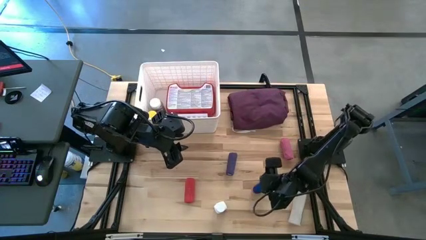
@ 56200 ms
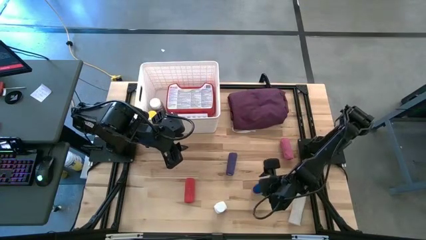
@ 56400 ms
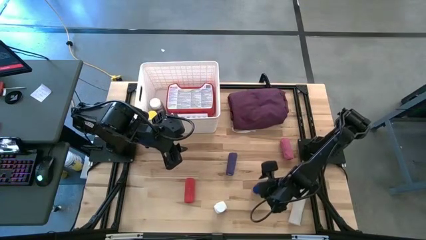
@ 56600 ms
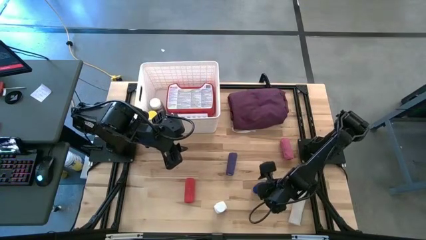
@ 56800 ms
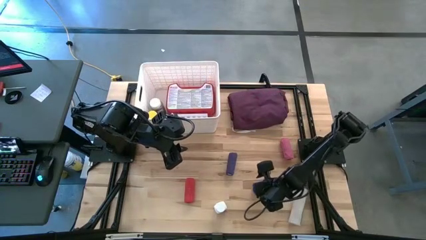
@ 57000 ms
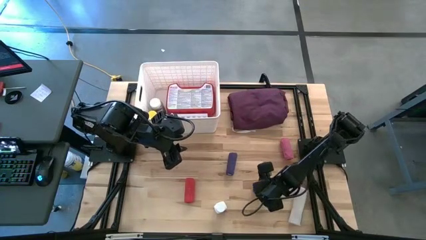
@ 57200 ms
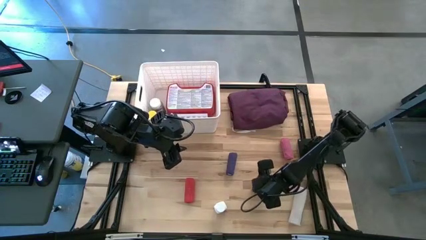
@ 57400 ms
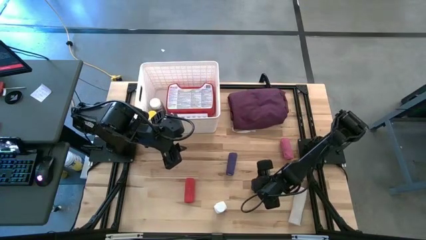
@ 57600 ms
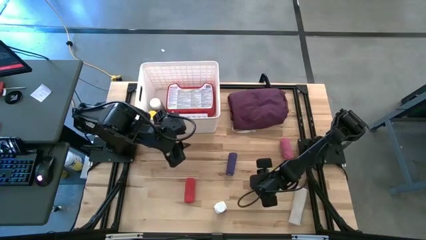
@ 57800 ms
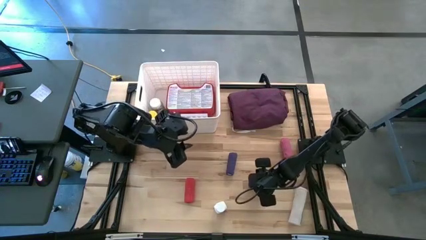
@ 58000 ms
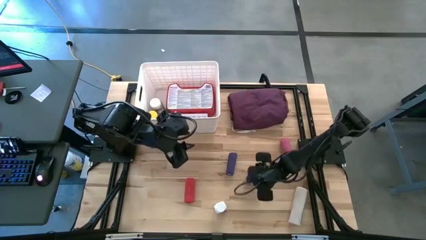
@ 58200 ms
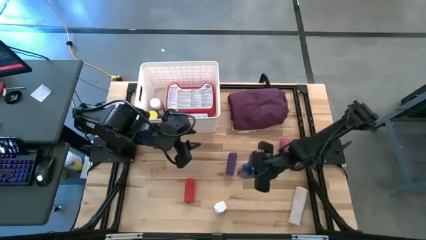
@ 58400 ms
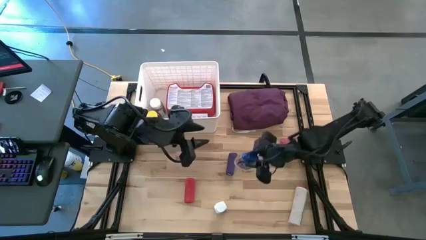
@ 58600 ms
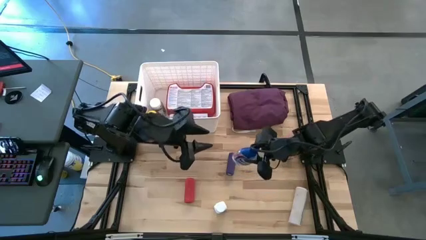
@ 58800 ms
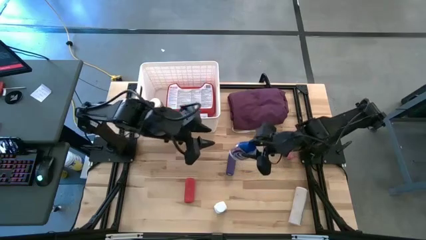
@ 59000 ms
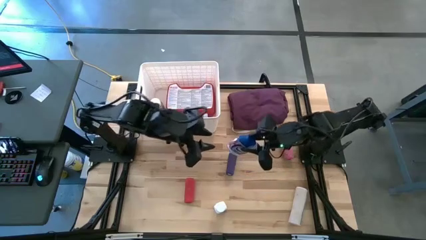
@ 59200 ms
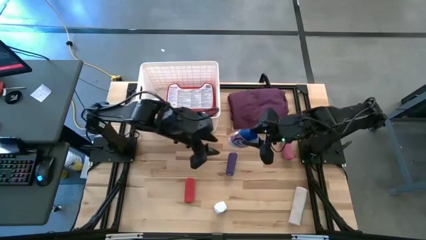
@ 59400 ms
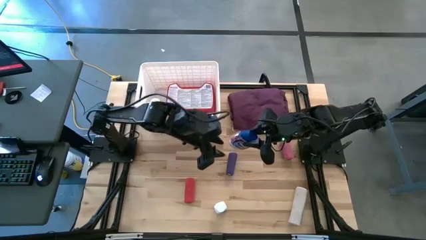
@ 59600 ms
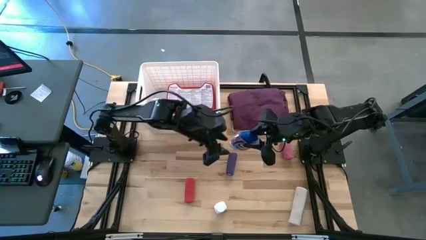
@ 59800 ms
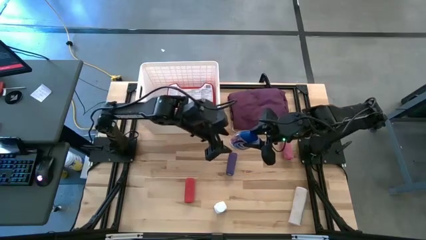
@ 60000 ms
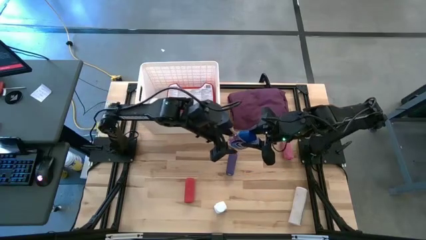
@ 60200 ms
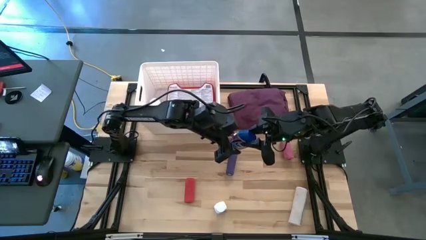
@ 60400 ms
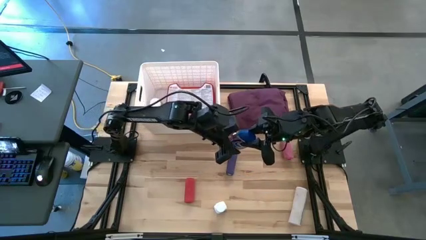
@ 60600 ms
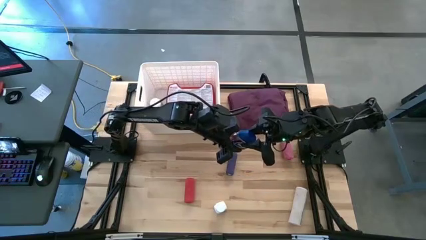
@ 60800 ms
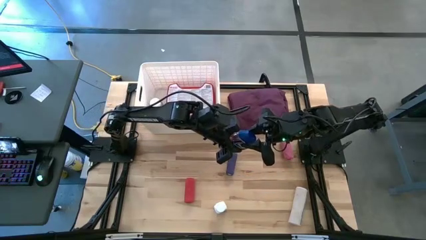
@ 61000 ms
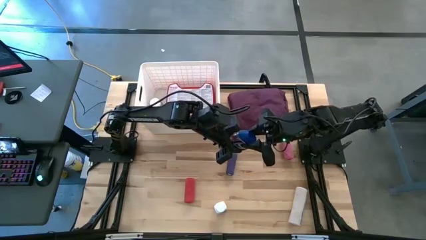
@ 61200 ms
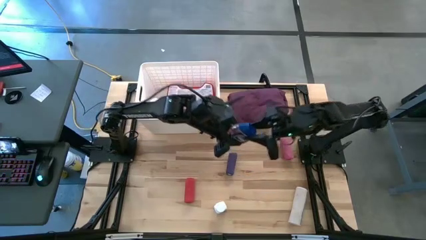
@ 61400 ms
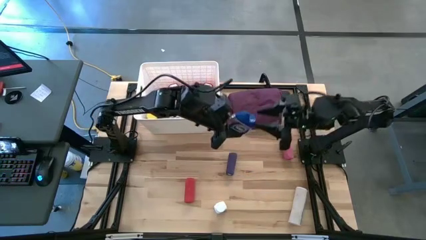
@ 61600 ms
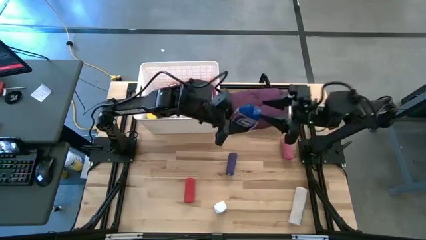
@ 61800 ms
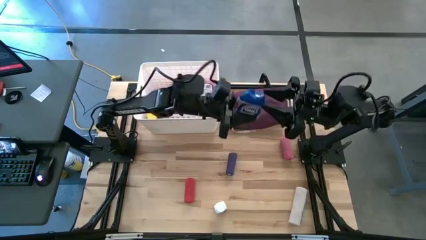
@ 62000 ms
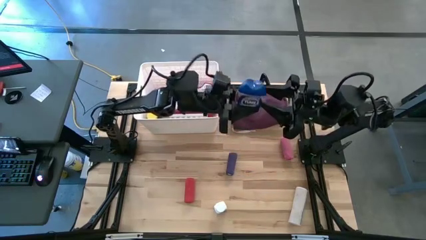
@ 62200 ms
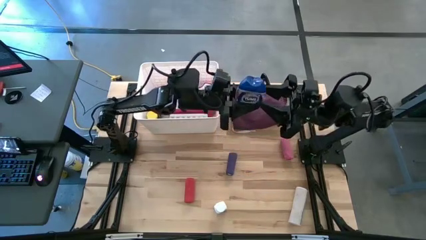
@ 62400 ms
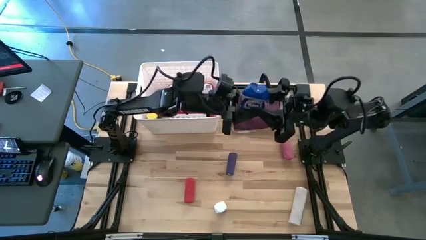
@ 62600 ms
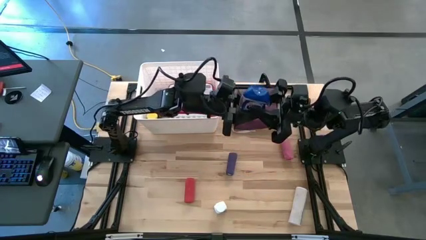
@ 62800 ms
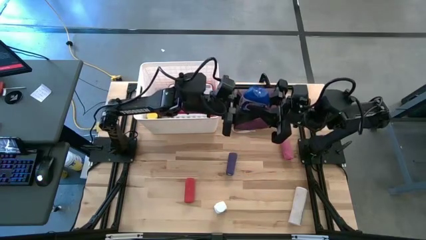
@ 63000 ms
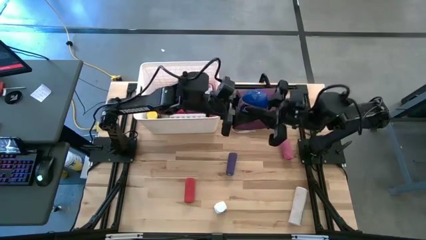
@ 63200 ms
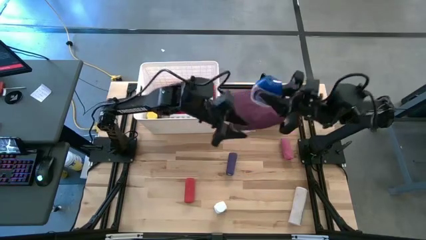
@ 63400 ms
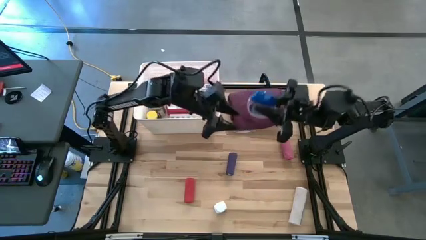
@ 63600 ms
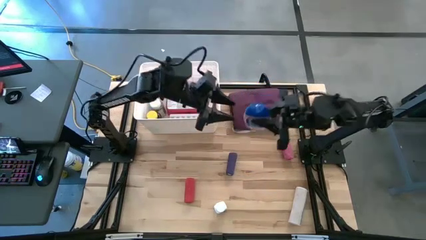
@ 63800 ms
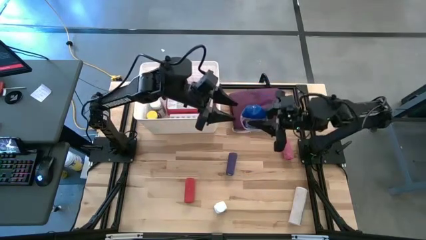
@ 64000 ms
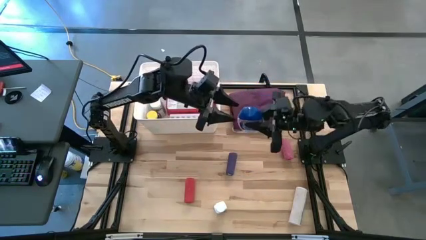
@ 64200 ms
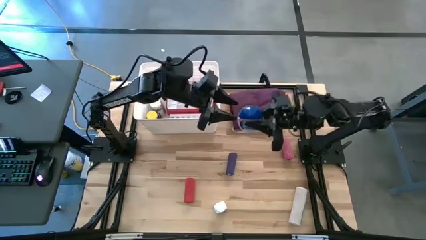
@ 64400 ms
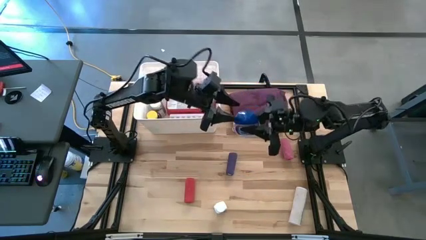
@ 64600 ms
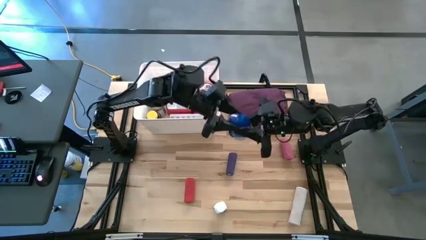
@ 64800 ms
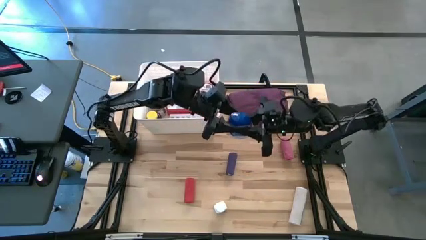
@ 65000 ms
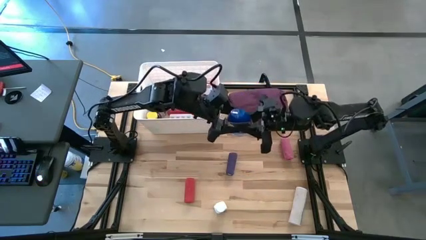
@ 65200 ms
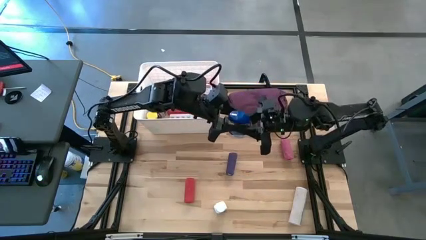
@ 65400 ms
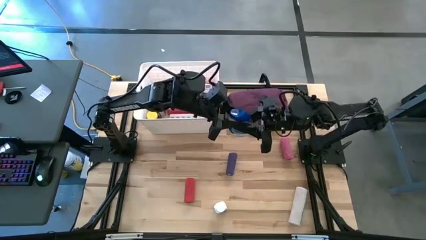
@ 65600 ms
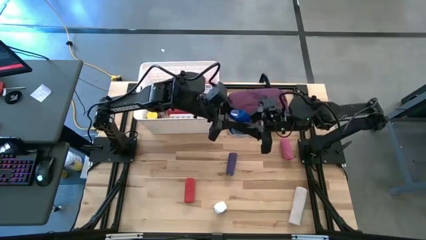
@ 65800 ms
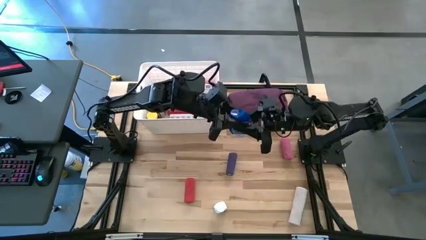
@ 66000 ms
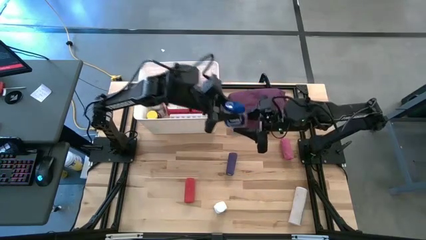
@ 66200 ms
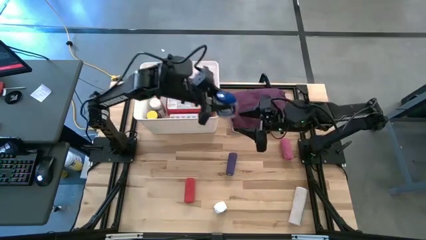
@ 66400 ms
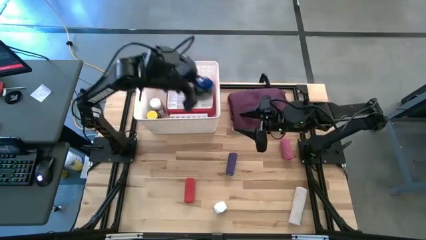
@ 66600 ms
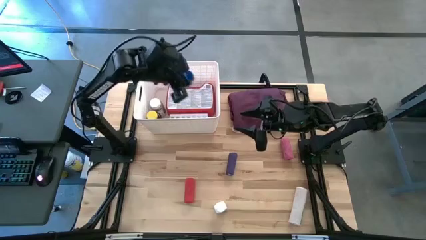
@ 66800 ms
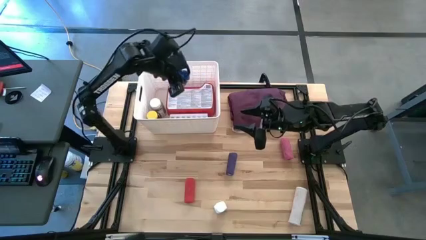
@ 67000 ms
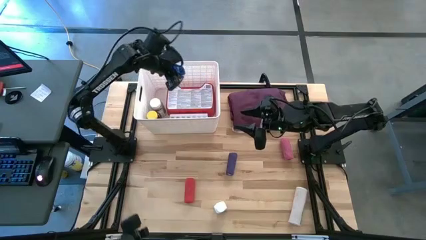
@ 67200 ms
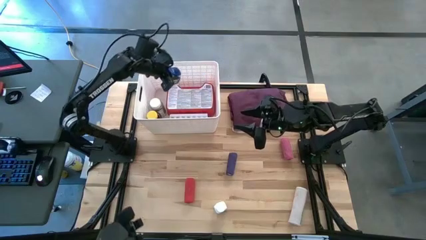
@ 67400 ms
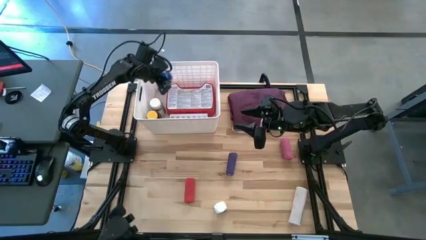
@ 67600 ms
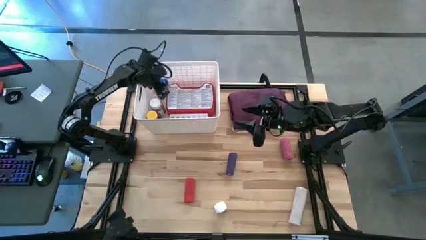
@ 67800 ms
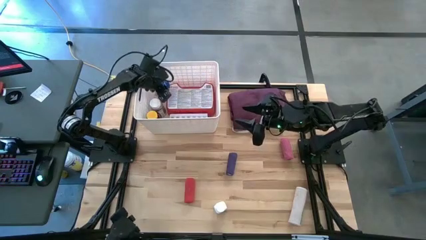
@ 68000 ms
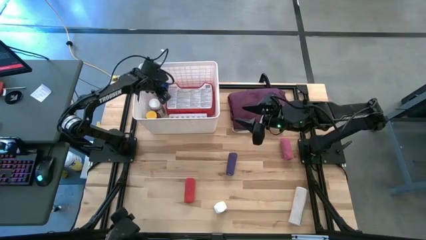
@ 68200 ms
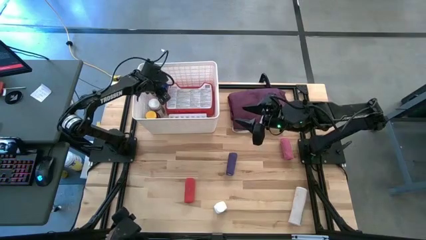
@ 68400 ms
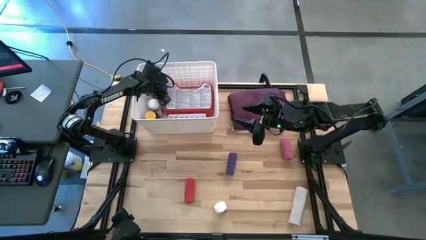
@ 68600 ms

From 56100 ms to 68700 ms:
Task: Pick & place medical supplies in basket/bin
Put the blue pill bottle into the white bin

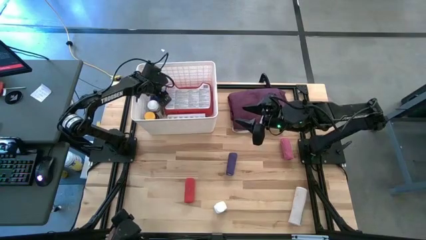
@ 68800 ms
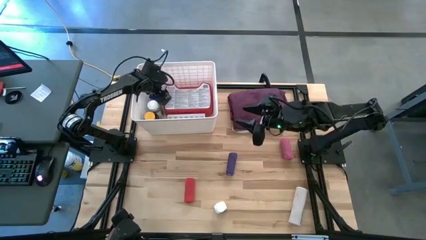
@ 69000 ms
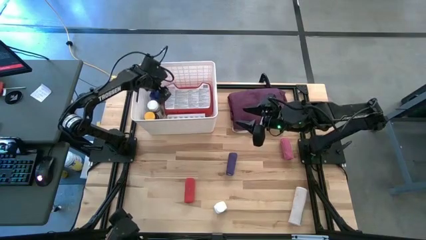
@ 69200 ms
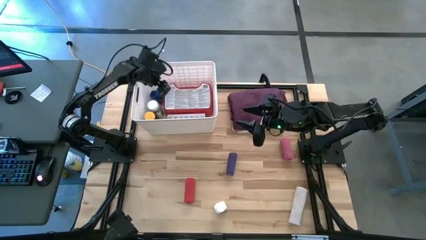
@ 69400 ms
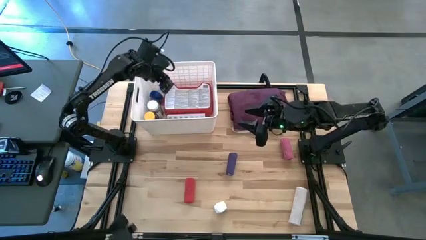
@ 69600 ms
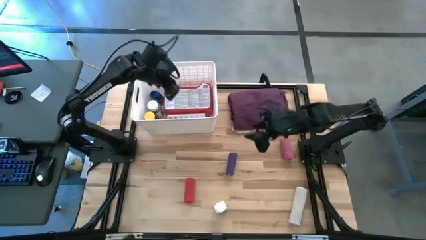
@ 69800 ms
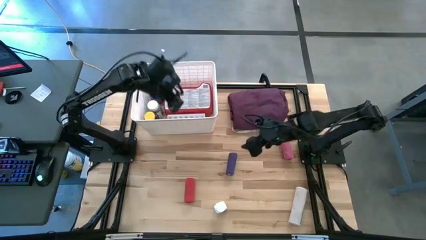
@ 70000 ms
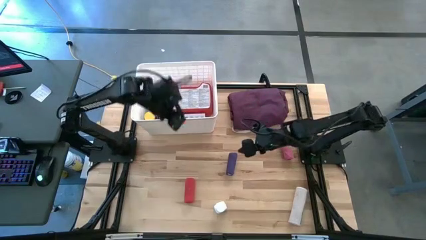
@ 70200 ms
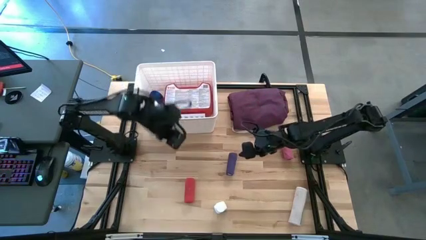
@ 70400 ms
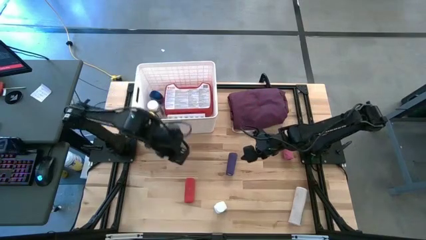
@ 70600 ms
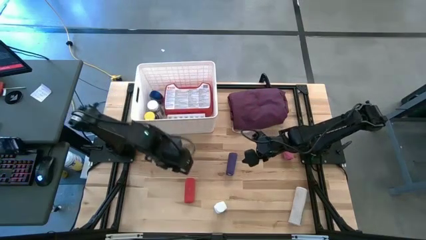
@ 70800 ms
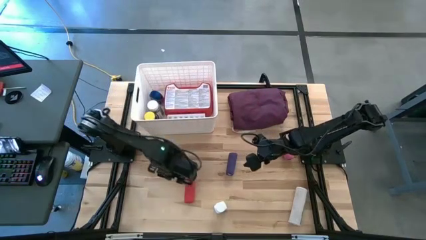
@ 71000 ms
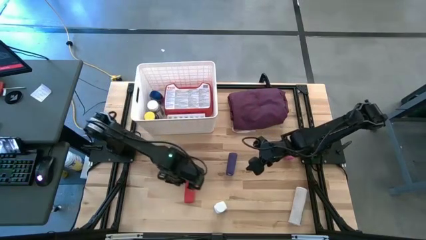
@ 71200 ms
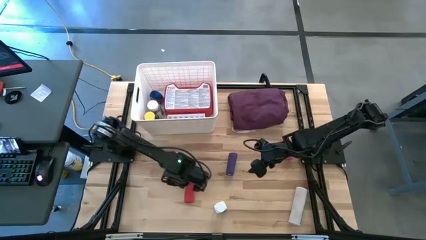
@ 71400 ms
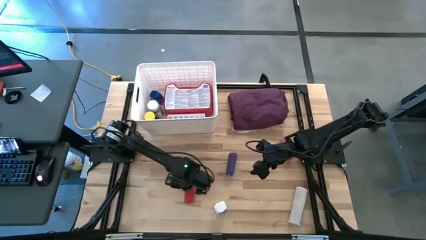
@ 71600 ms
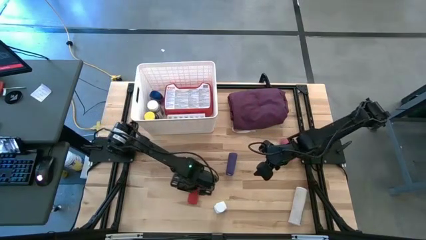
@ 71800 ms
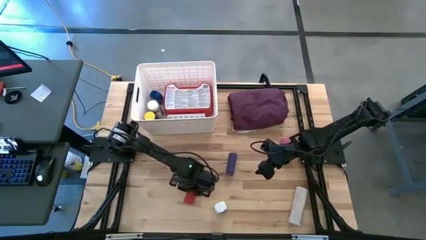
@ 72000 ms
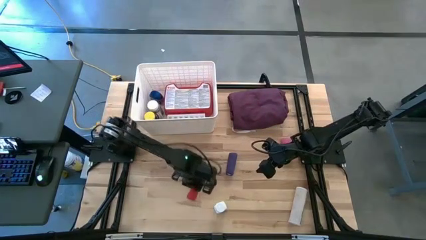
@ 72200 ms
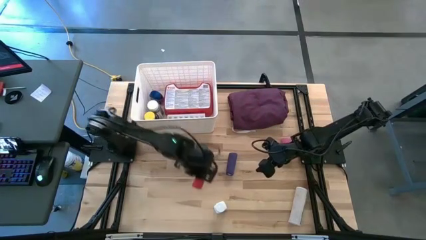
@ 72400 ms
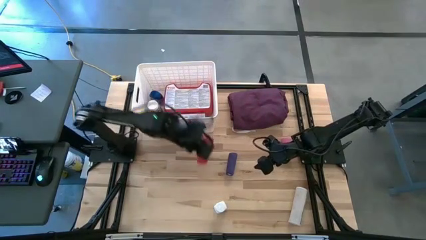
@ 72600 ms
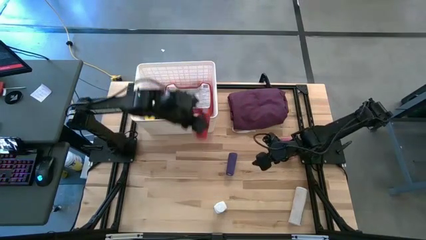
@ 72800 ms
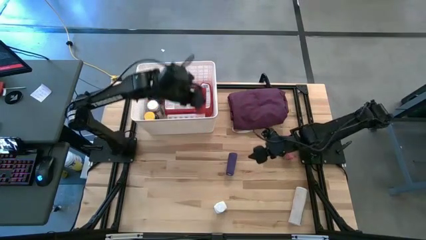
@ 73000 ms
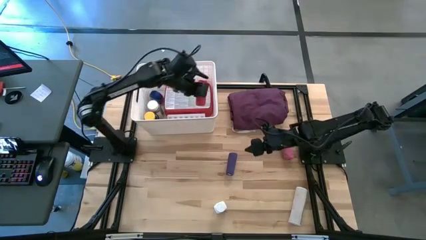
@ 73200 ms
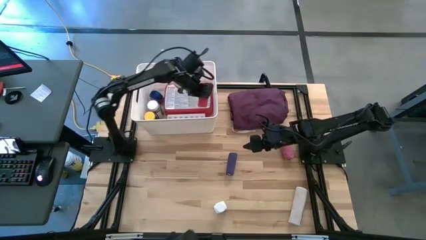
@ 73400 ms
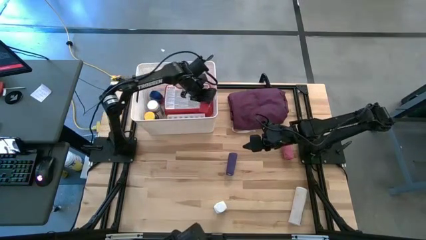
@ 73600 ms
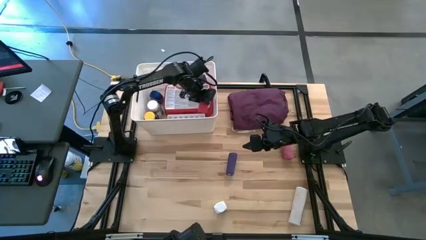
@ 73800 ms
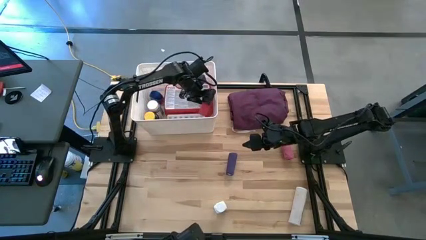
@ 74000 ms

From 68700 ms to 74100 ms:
Put the red bandage into the white bin
